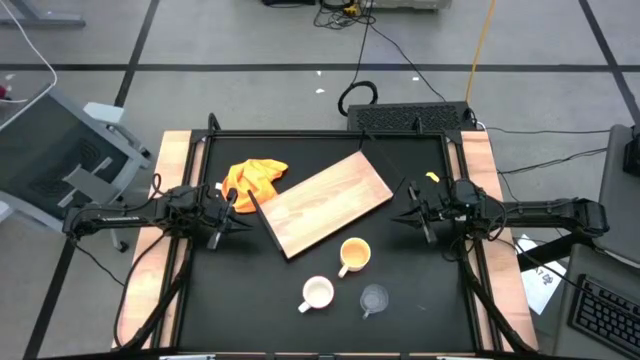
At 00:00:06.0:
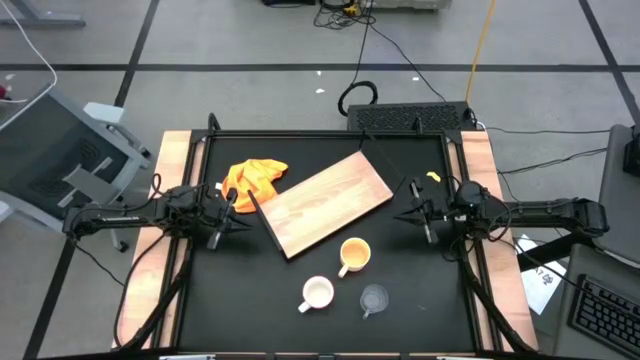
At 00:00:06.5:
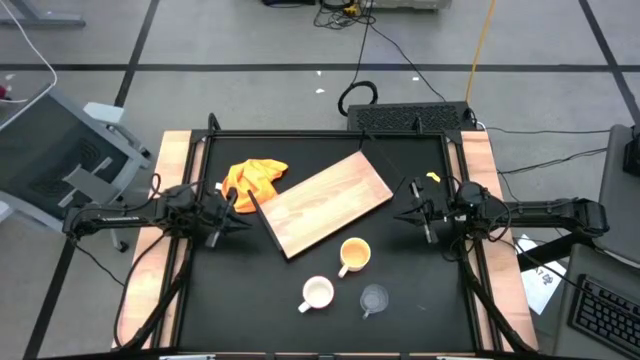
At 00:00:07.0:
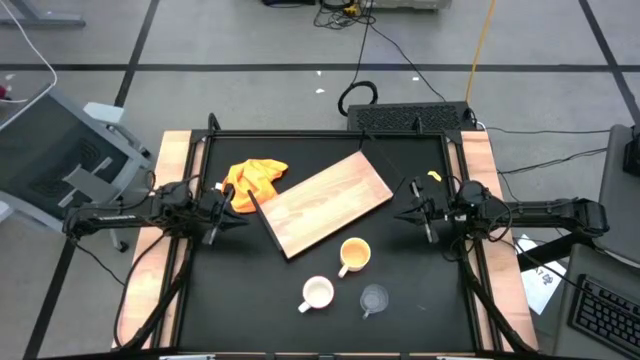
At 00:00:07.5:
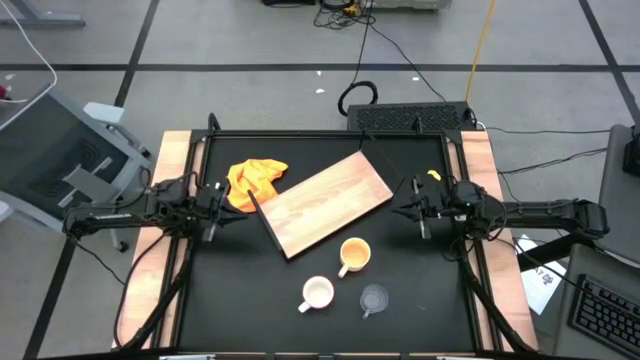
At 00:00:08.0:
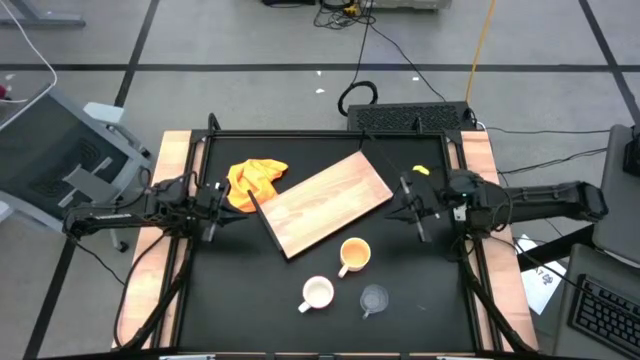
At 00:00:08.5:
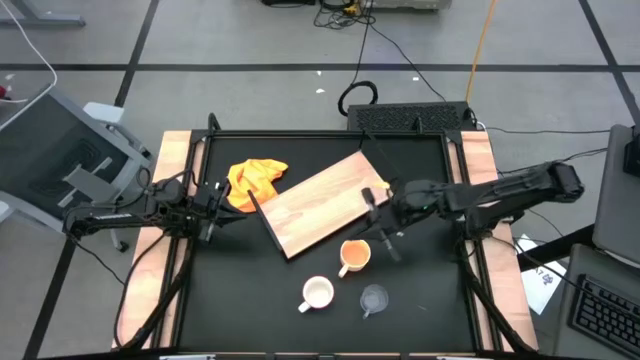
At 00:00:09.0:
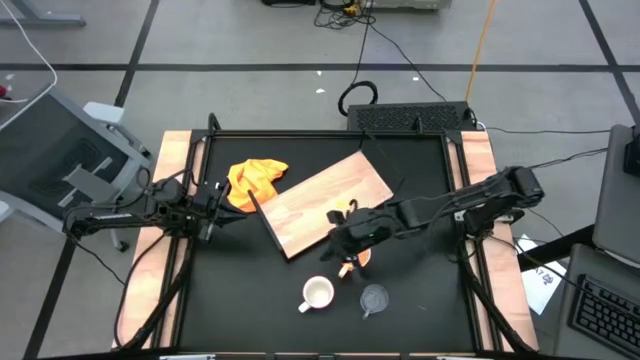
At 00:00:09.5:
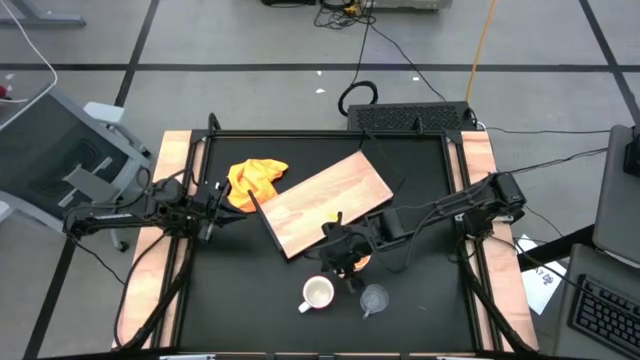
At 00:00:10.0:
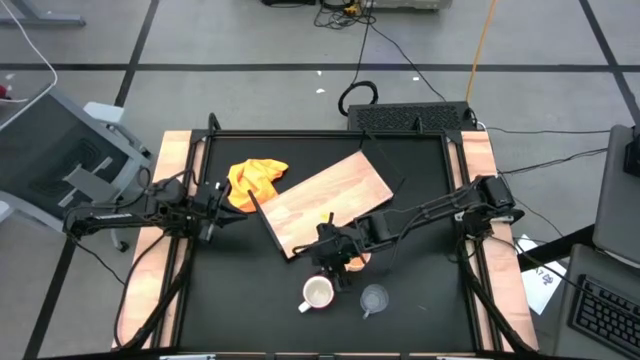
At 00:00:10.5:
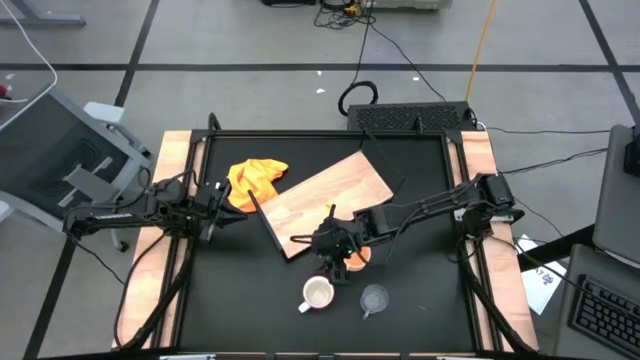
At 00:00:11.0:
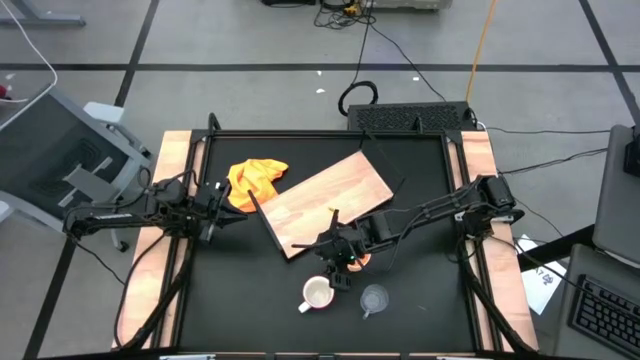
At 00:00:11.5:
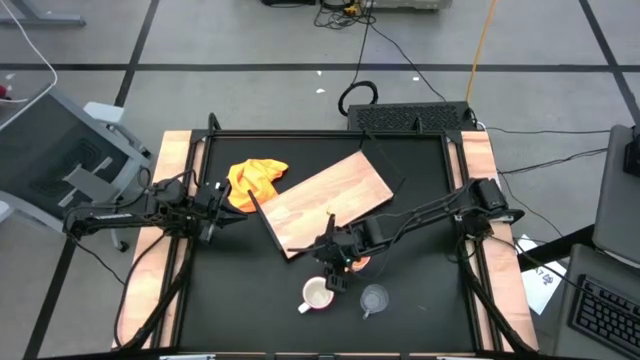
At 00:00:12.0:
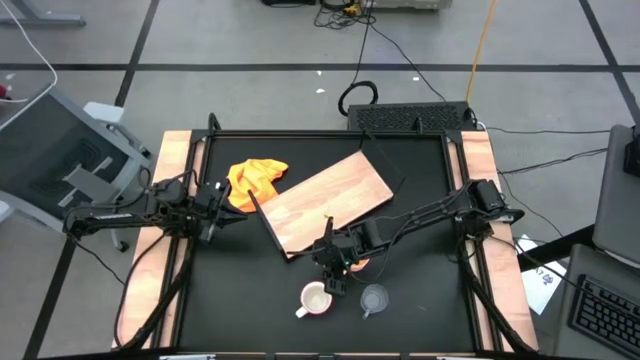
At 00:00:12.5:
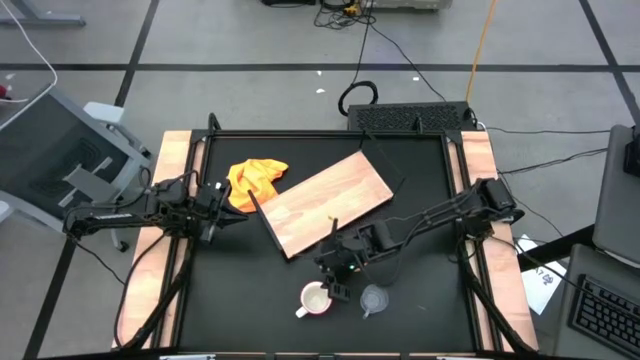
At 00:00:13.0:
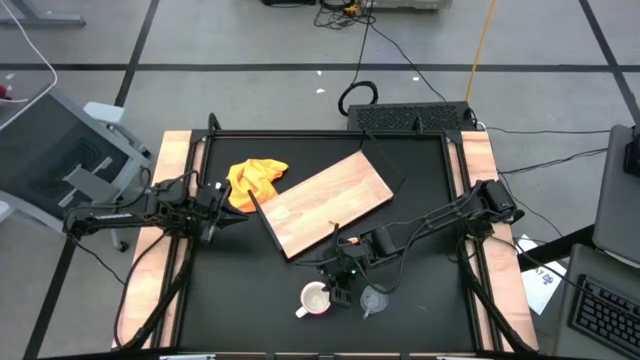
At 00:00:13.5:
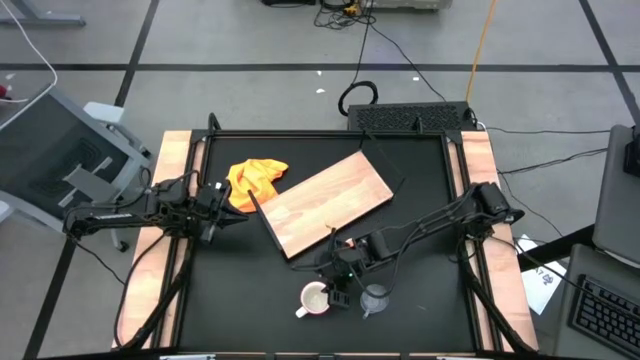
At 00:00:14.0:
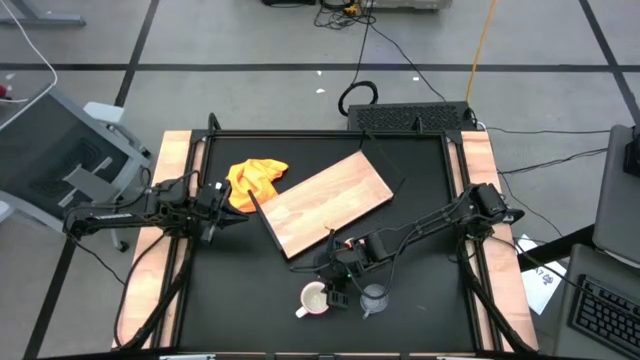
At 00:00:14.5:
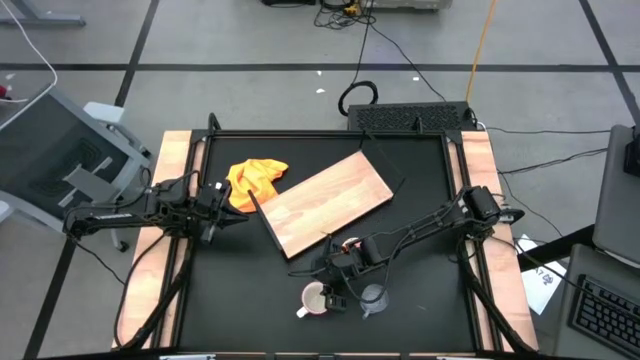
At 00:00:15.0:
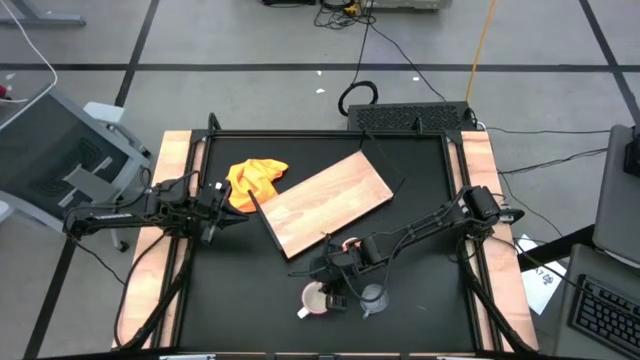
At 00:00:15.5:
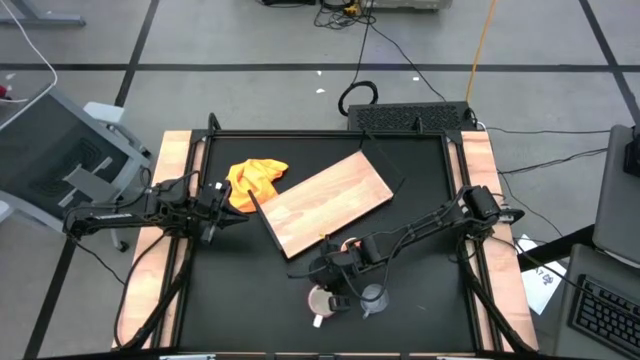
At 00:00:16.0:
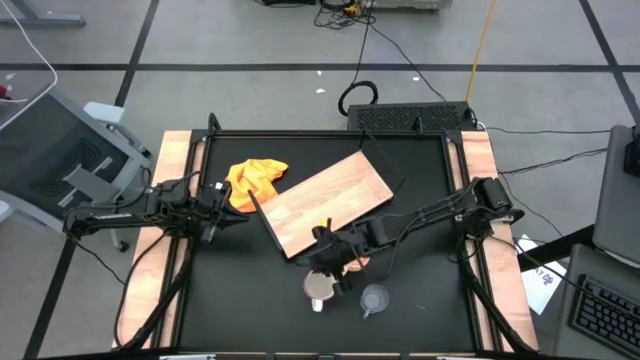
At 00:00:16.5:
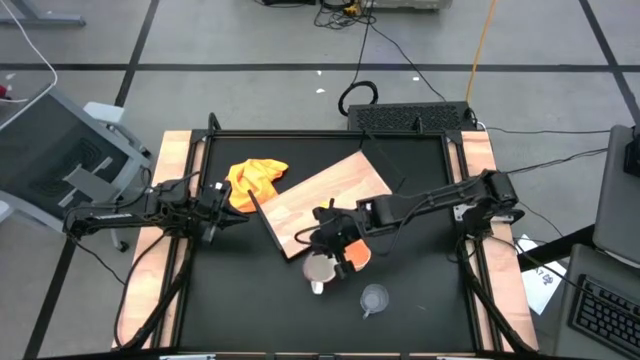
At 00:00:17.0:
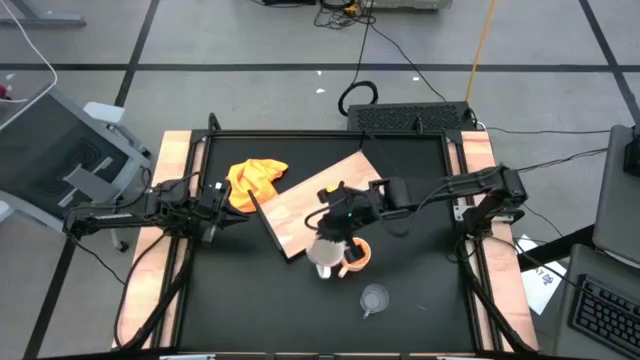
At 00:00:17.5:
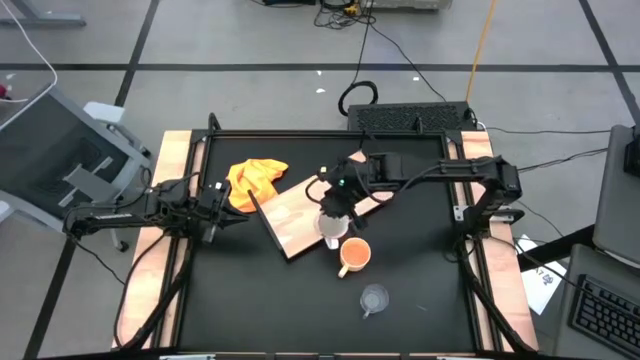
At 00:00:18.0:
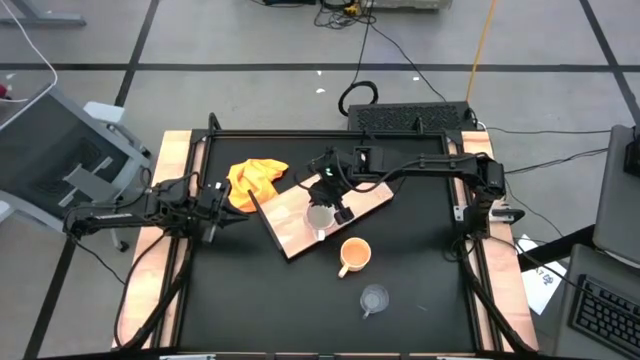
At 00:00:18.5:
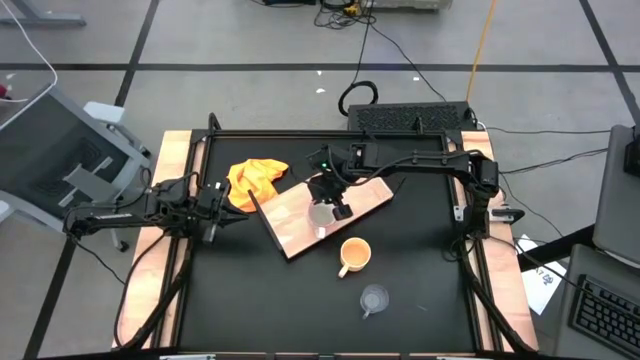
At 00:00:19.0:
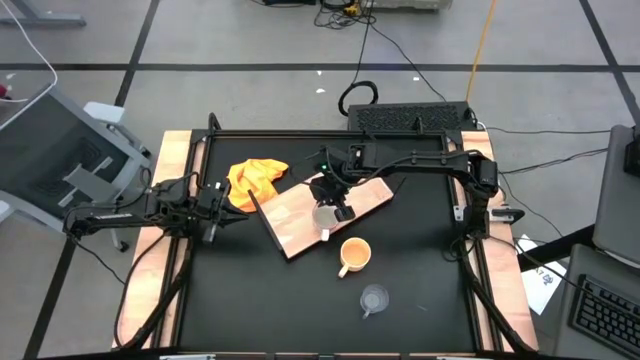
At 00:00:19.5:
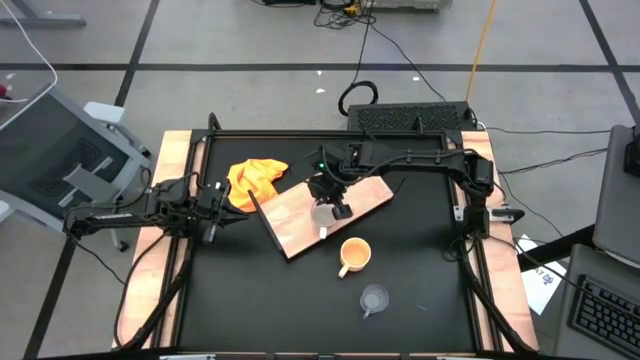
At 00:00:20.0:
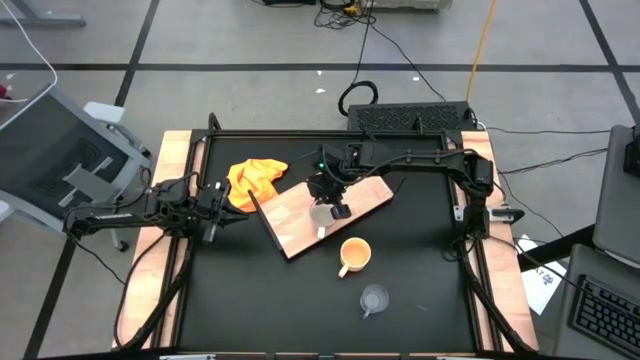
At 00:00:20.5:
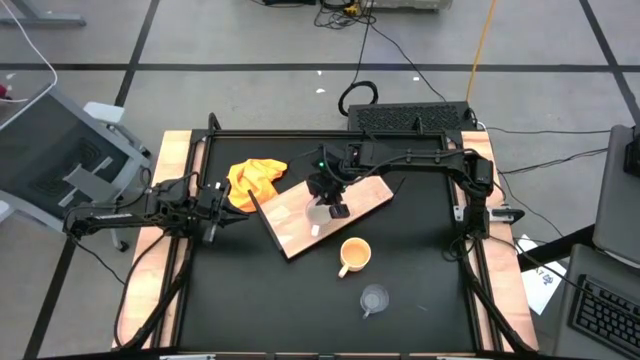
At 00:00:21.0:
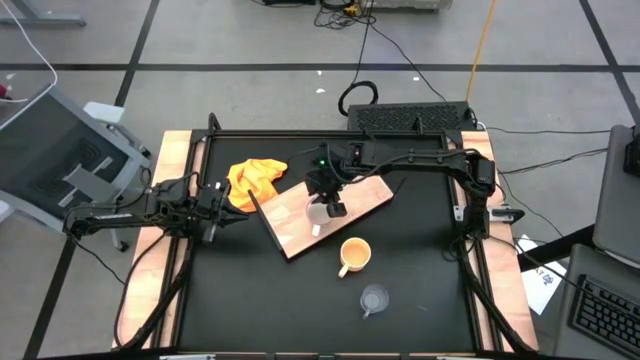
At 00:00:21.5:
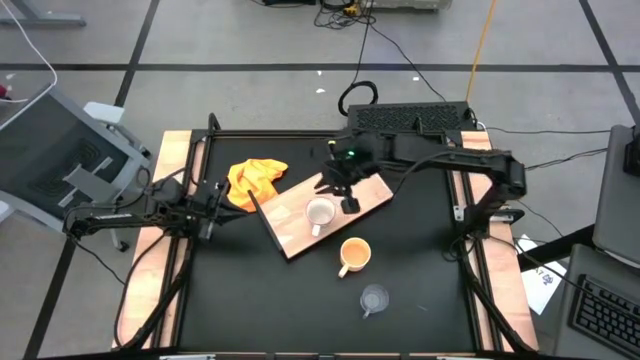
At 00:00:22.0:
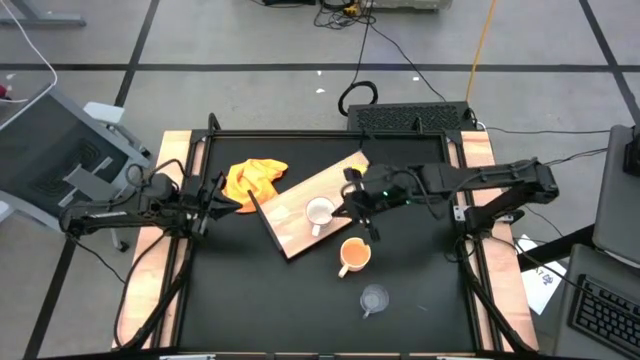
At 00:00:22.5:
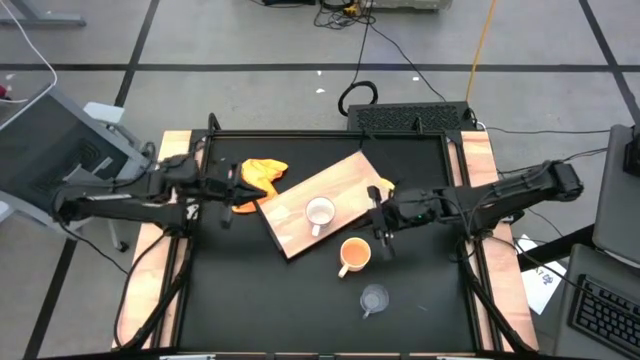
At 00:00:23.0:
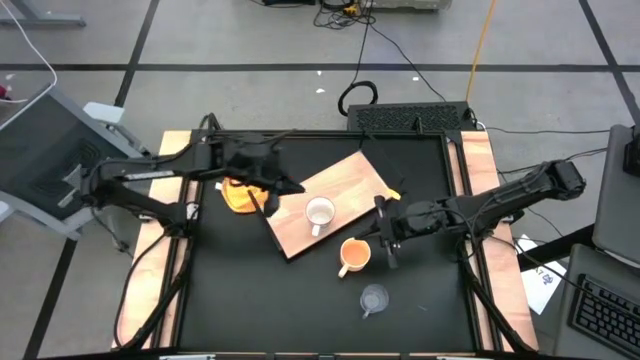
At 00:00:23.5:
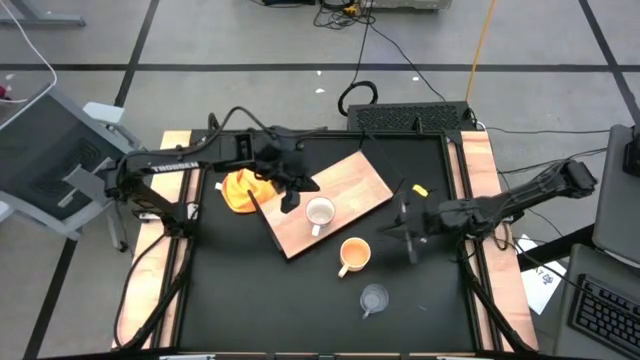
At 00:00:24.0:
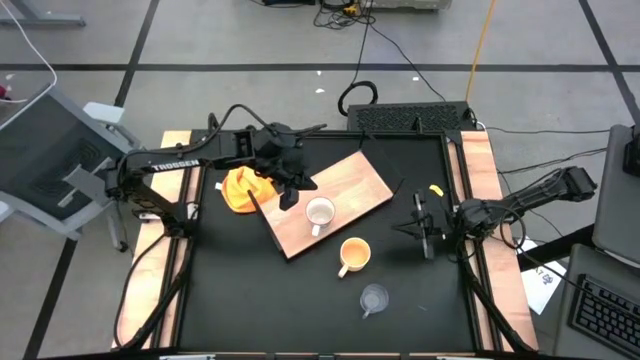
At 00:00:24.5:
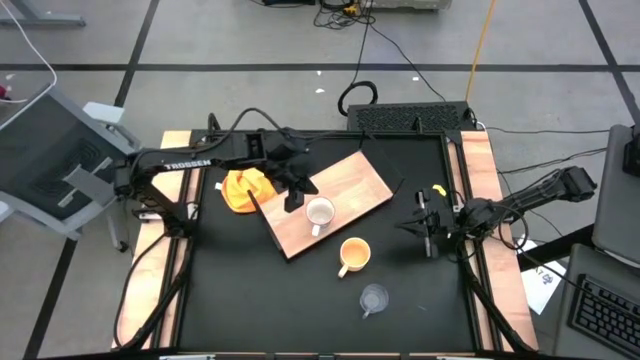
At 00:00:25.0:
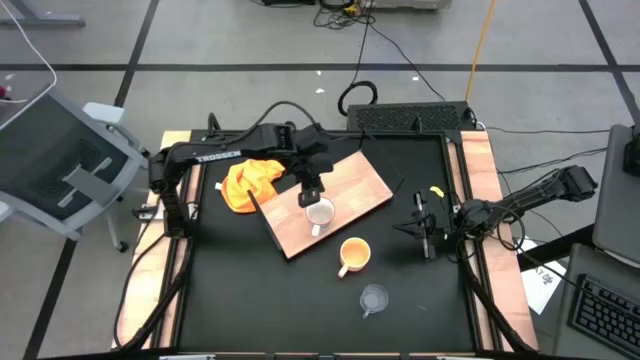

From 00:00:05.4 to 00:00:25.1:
Task: Stack small to large cups/mugs on shelf
Put the white mug on the shelf
